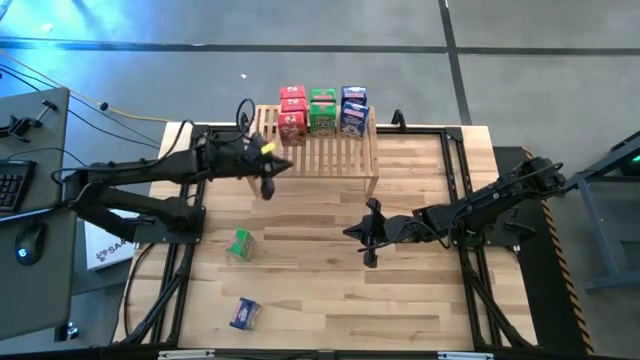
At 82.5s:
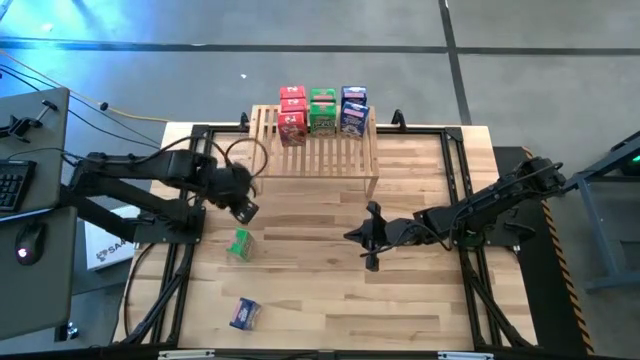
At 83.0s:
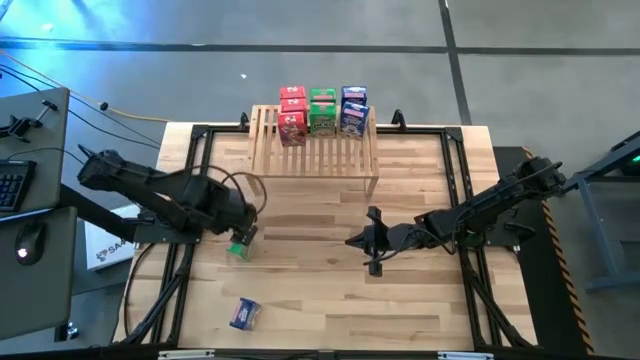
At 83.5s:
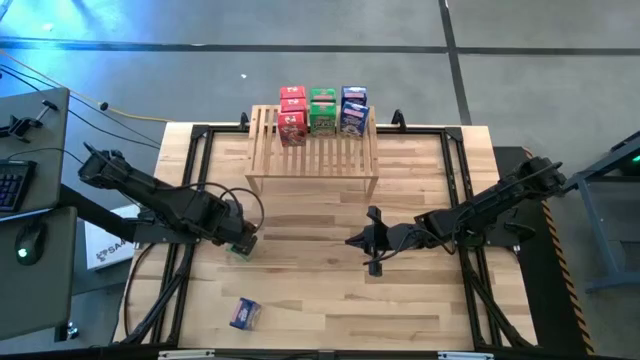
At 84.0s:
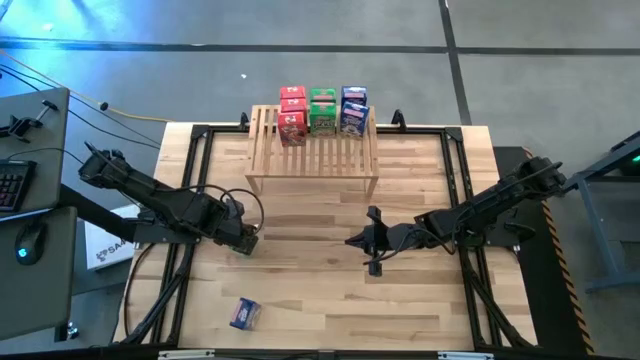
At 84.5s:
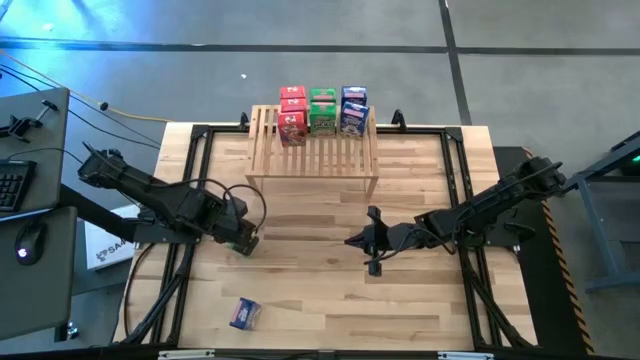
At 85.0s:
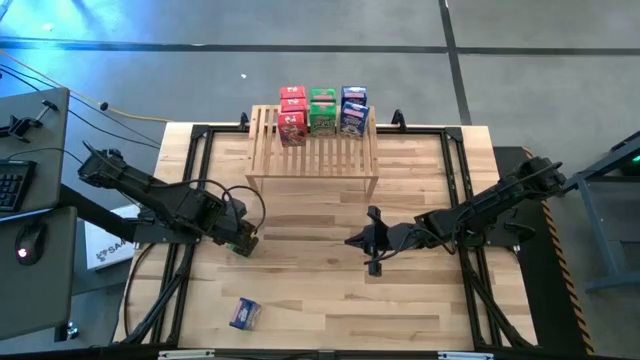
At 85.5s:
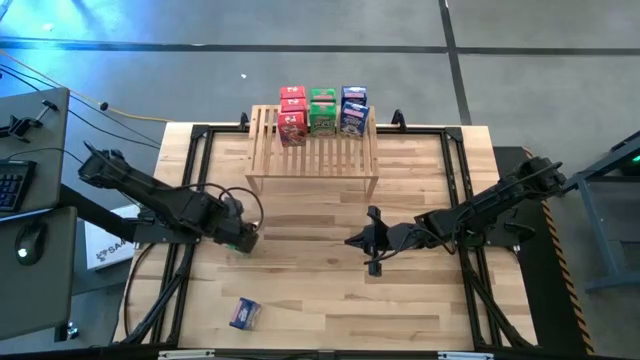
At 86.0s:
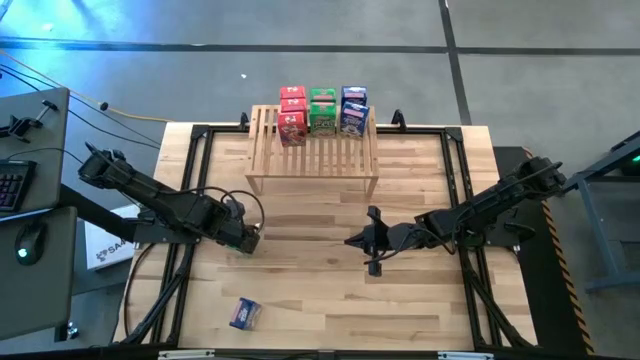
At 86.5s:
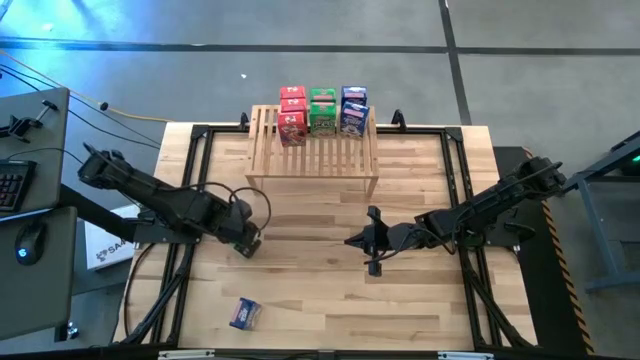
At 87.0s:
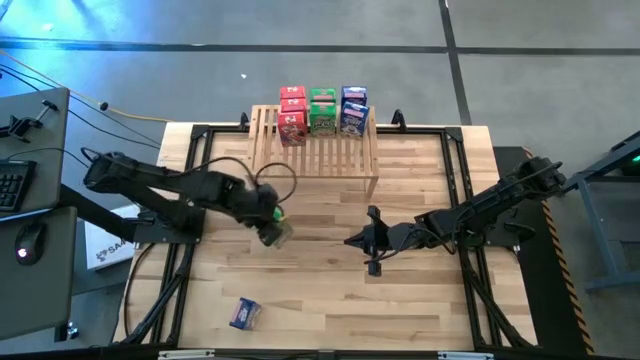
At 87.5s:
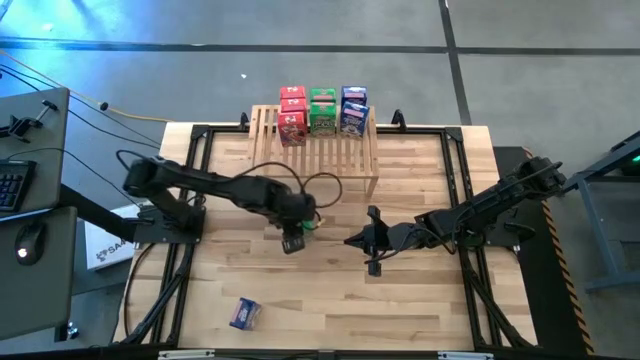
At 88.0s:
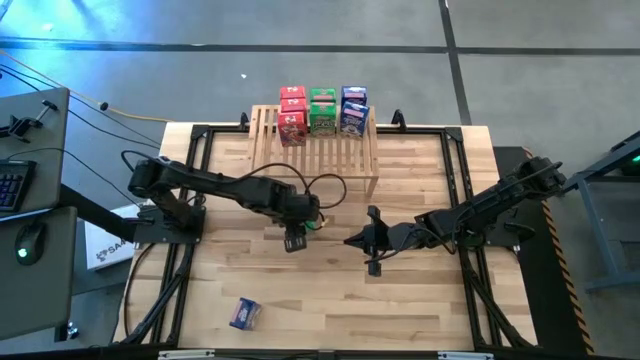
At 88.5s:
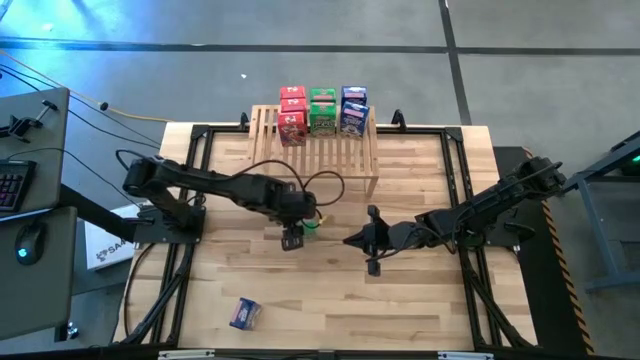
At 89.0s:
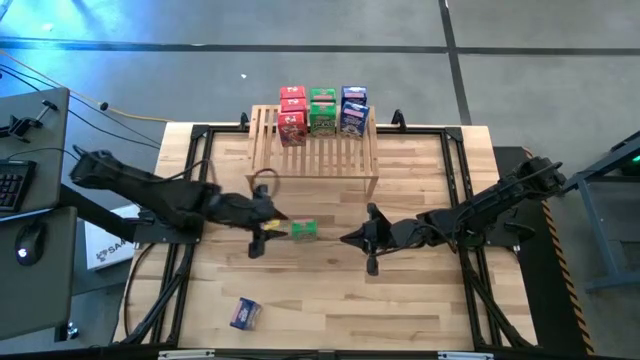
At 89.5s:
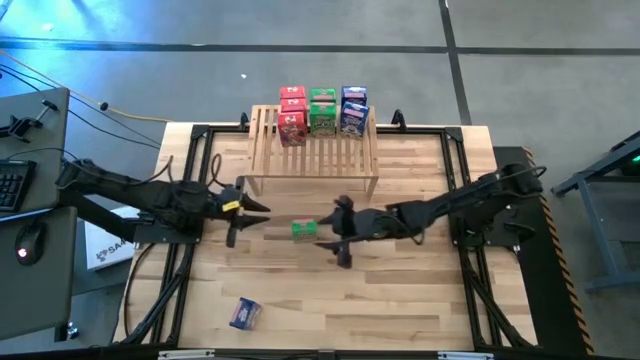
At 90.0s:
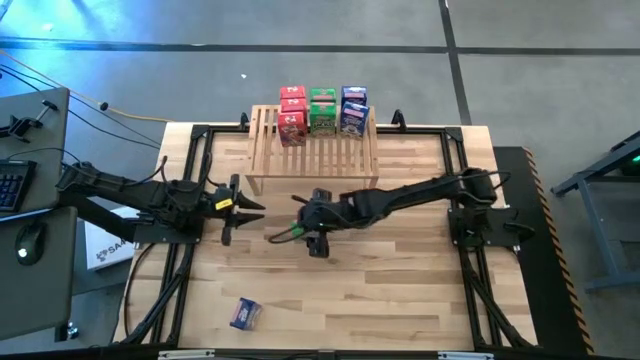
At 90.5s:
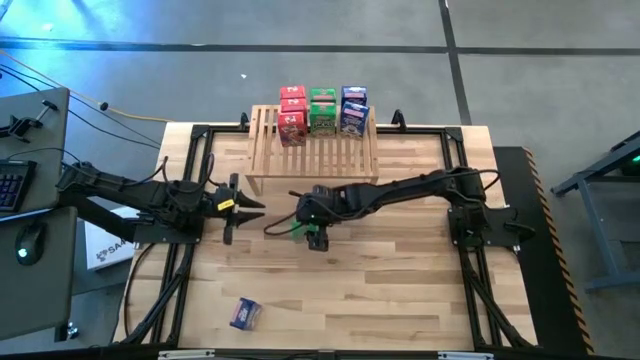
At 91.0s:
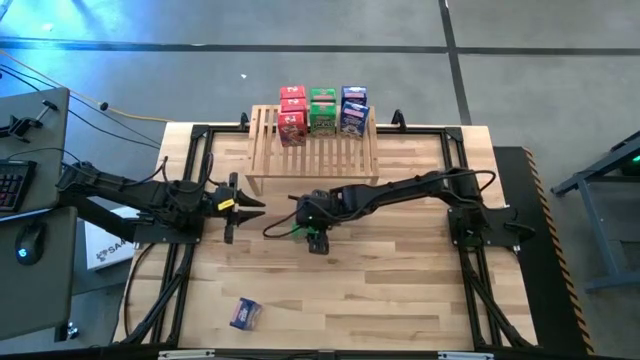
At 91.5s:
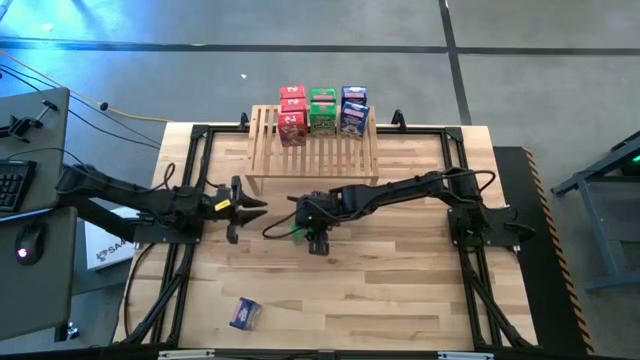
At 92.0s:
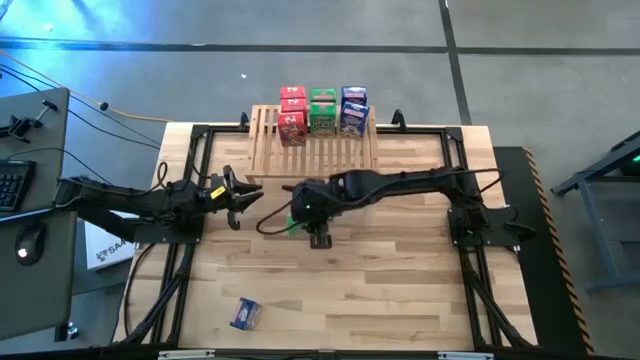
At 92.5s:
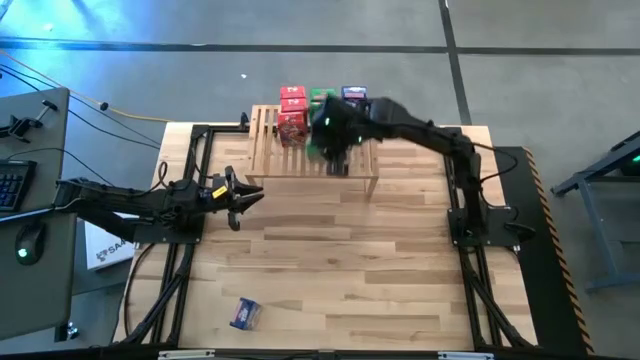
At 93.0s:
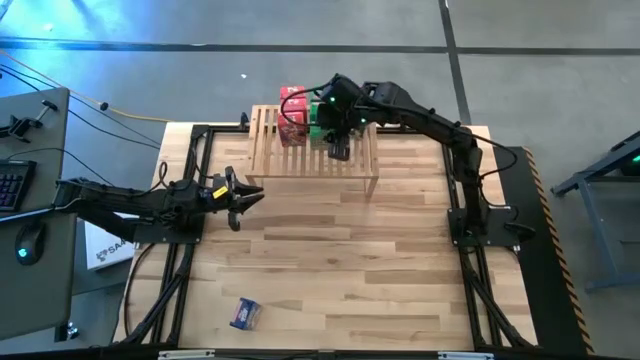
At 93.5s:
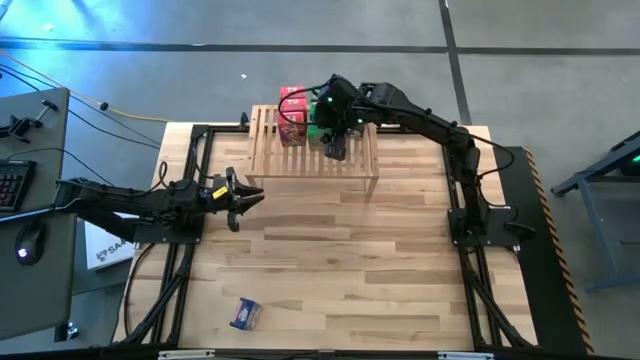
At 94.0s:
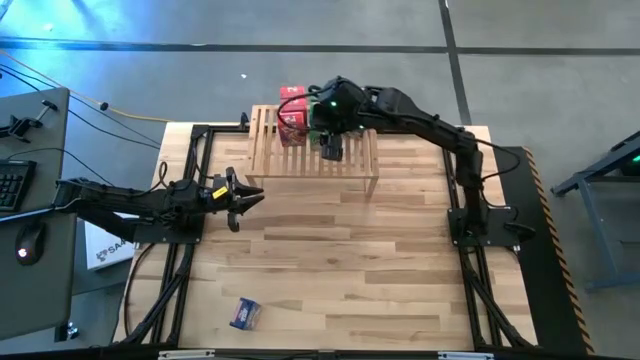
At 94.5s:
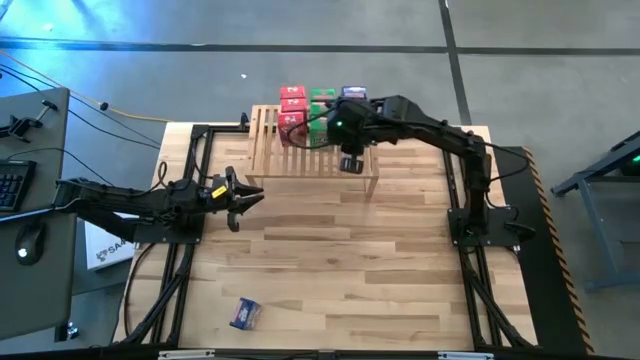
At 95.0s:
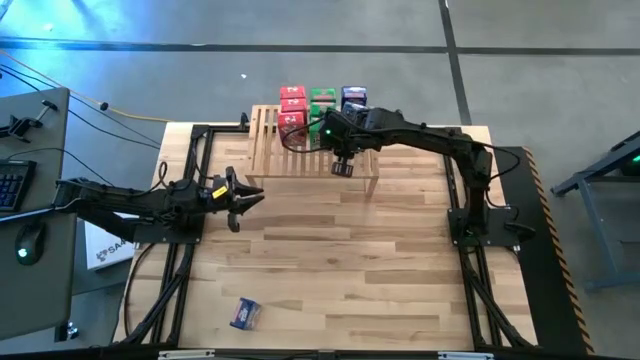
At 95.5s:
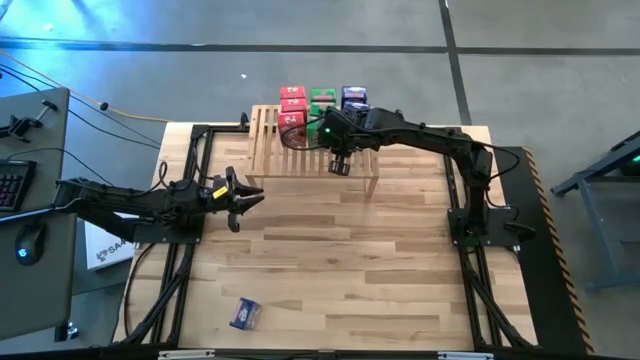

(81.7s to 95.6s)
Task: Stack cereal on shelf
Put the green cereal box on the shelf aligned with the other green cereal boxes
